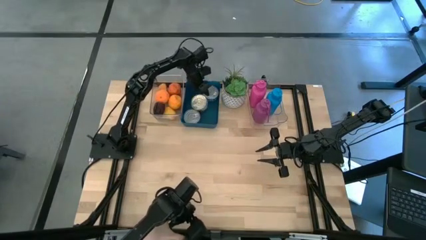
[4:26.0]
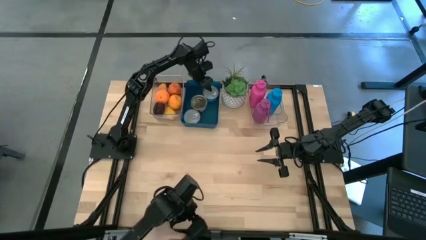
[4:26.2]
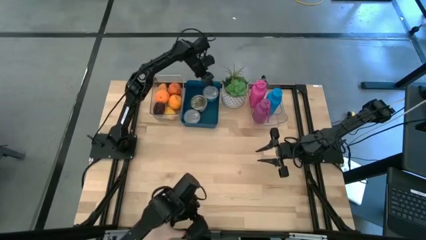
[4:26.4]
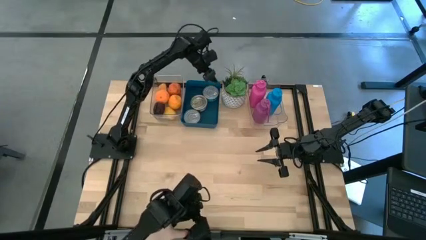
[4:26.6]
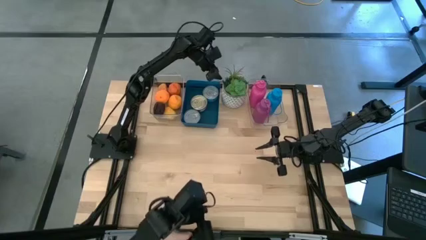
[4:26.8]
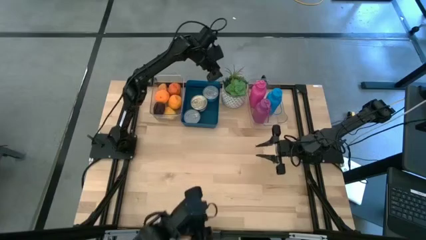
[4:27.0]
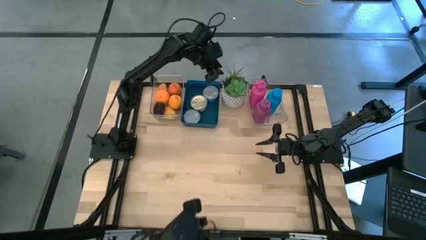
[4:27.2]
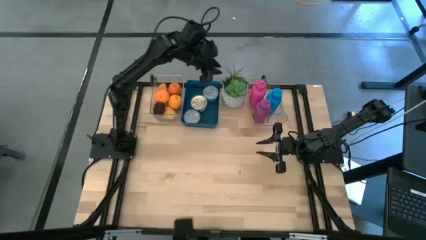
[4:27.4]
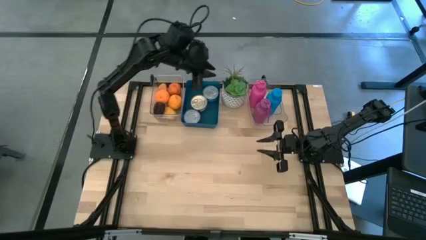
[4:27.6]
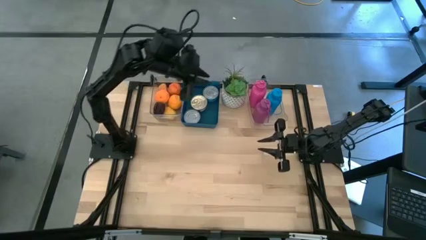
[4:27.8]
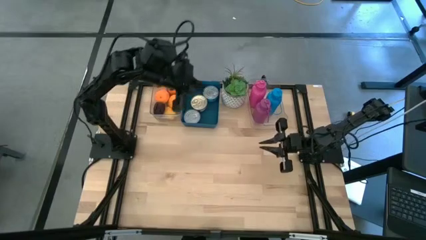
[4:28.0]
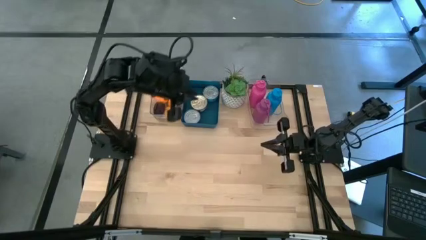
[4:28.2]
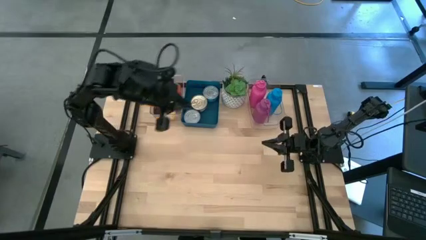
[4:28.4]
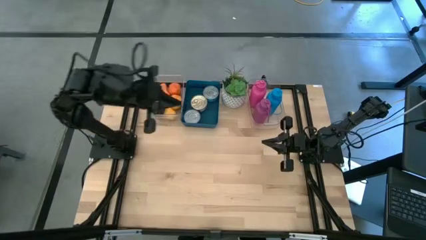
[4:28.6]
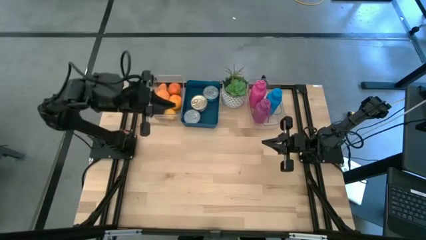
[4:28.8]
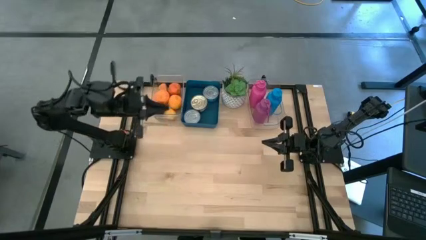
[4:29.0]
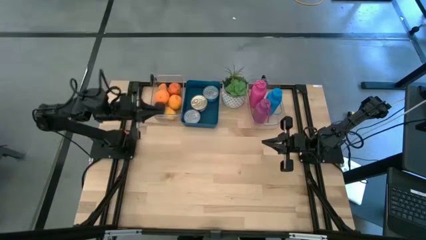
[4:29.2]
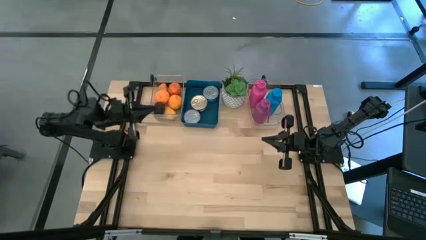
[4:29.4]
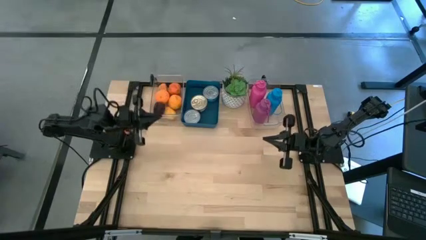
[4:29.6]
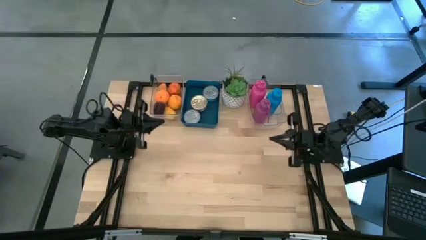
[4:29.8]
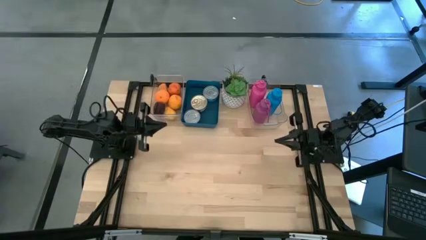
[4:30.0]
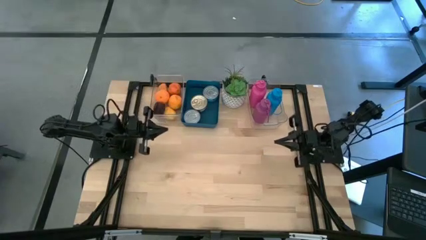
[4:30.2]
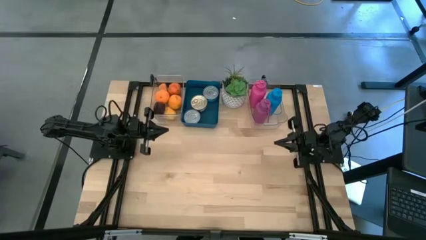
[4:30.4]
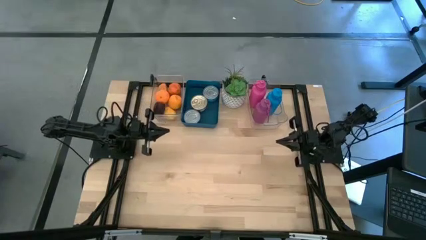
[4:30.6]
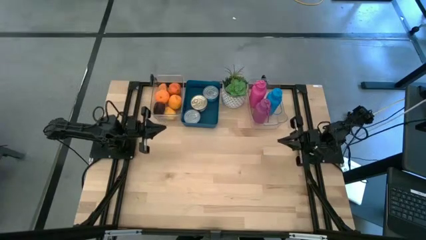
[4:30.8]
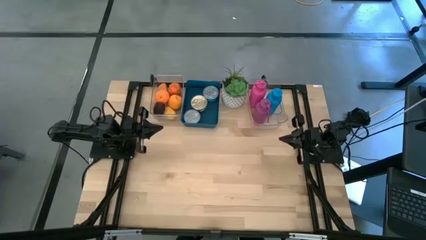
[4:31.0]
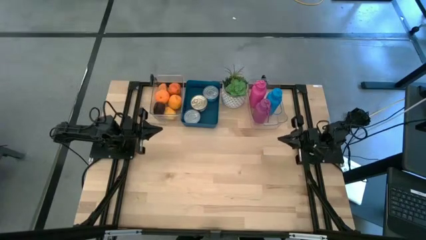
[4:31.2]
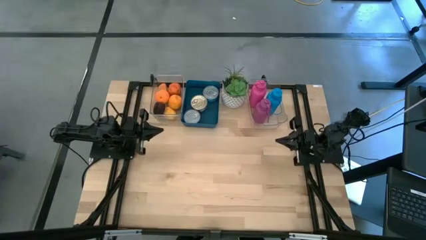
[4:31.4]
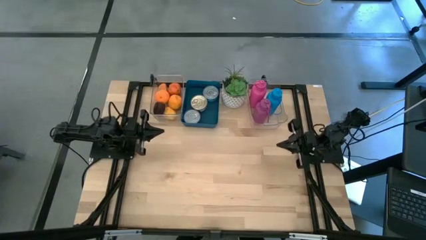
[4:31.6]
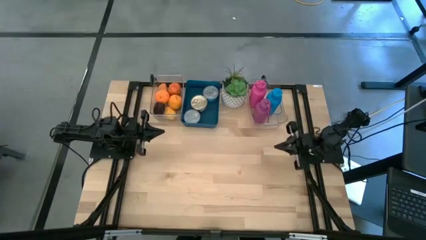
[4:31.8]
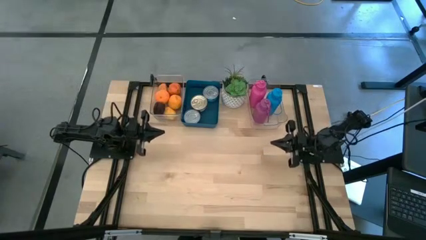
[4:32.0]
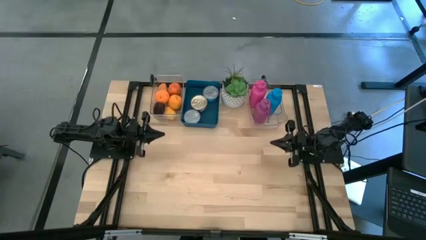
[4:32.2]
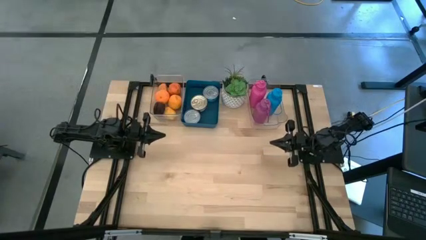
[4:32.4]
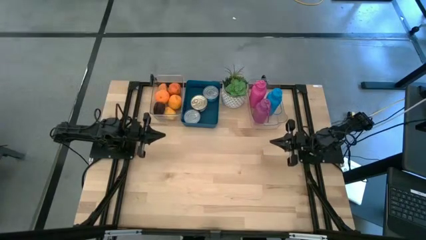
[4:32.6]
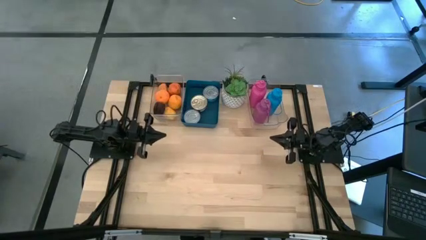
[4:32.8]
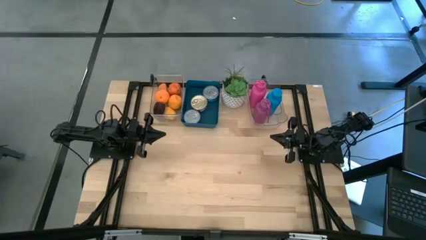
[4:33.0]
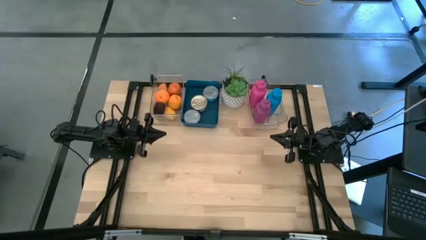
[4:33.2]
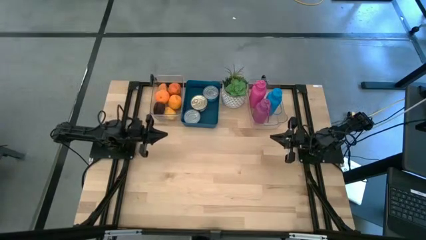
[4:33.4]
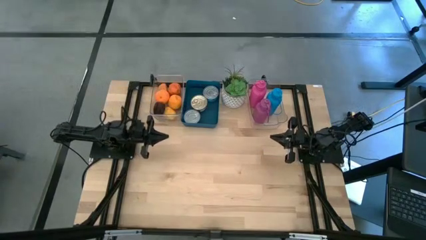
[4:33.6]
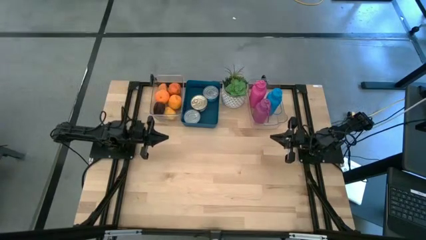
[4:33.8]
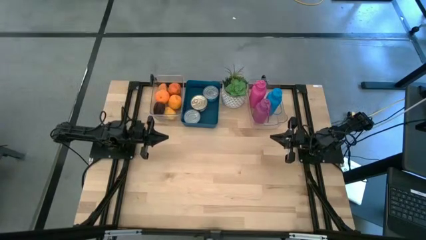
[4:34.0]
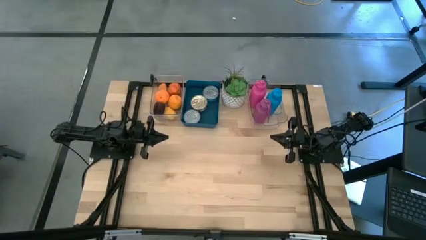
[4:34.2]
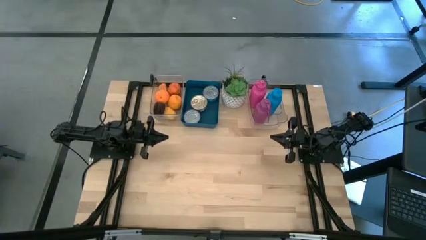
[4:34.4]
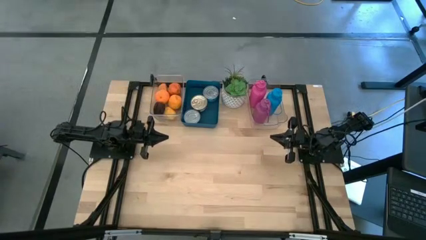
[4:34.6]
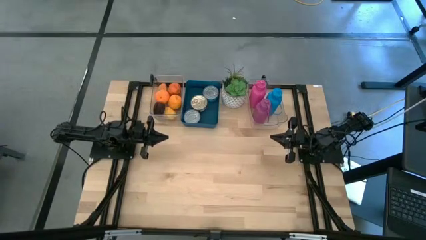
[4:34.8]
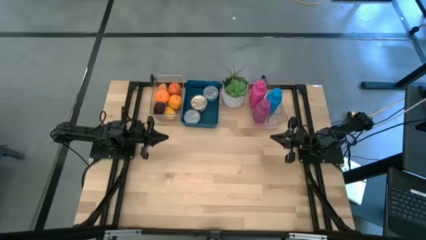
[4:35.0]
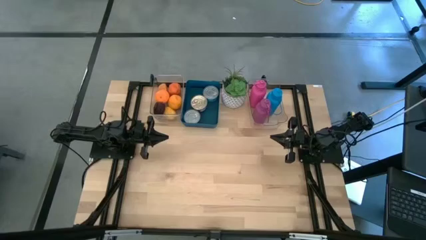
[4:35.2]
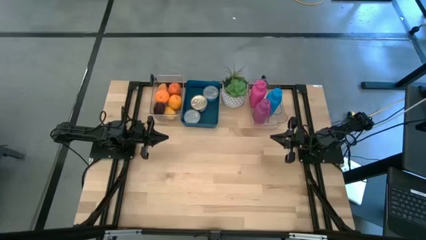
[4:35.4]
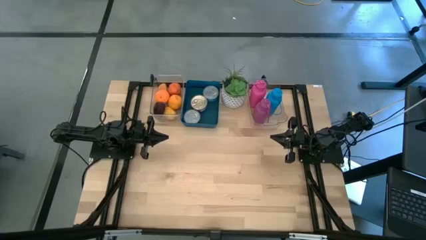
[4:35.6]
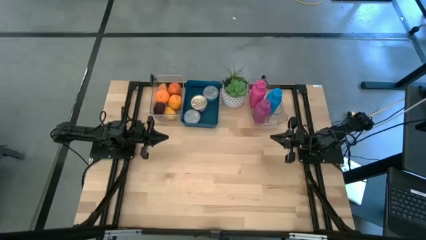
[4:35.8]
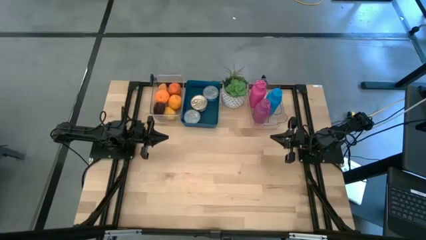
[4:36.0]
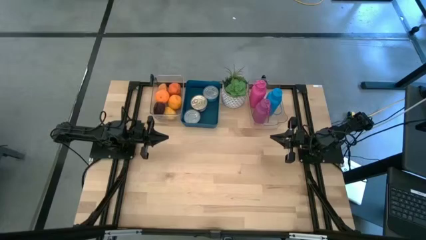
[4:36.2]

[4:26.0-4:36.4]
Task: Pick & Place Food Item
Return to Home Position

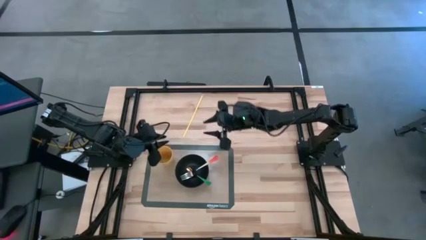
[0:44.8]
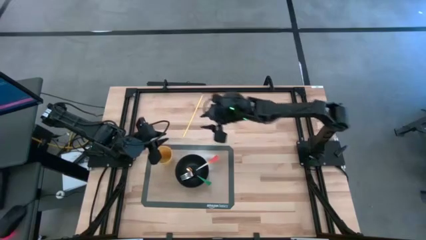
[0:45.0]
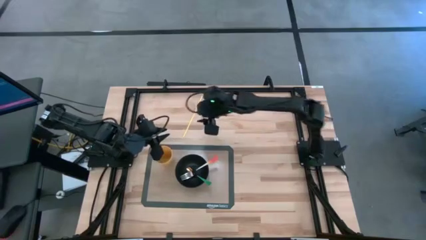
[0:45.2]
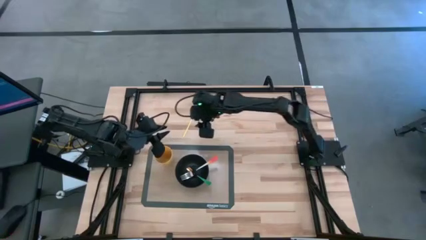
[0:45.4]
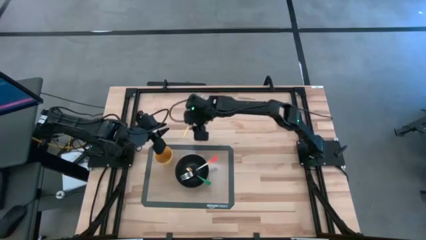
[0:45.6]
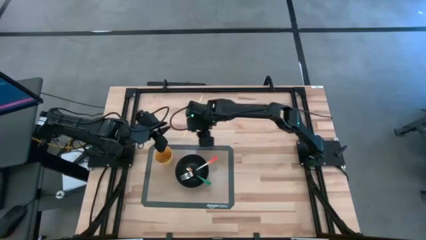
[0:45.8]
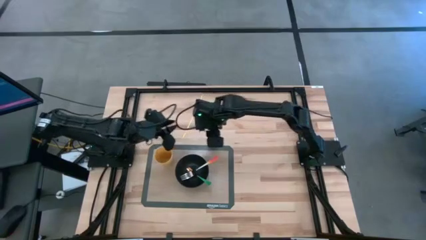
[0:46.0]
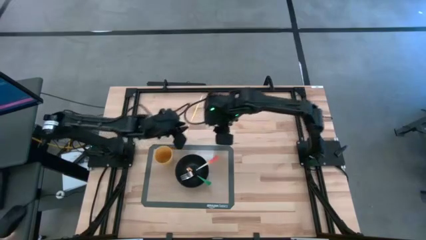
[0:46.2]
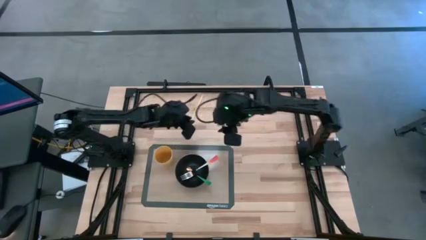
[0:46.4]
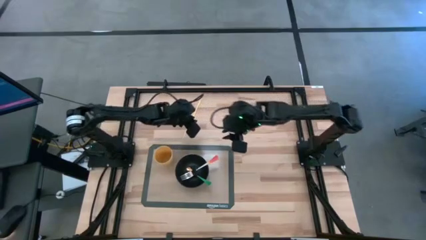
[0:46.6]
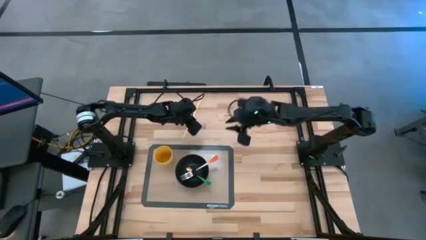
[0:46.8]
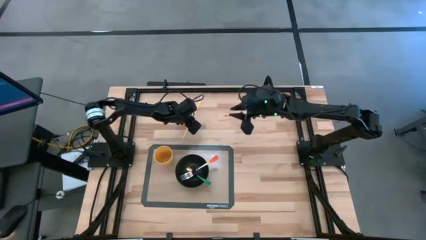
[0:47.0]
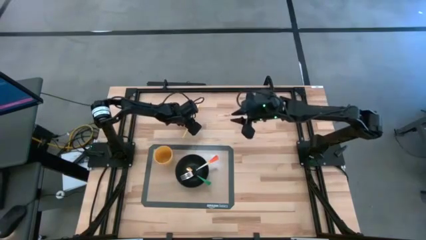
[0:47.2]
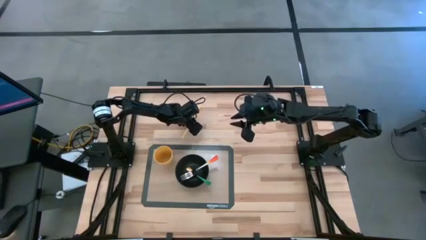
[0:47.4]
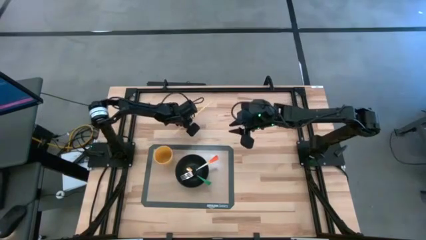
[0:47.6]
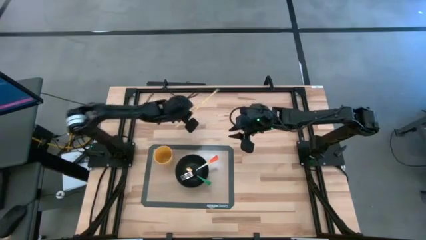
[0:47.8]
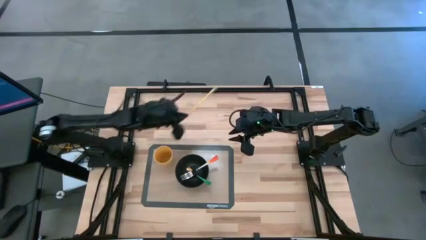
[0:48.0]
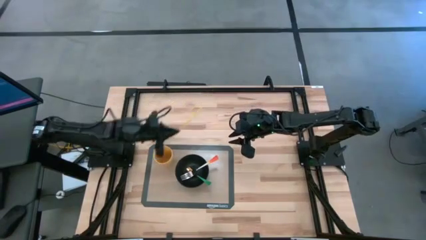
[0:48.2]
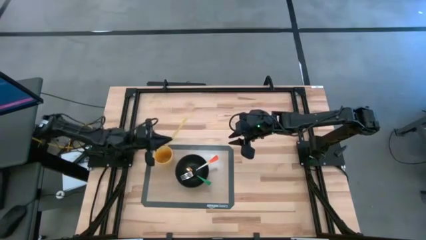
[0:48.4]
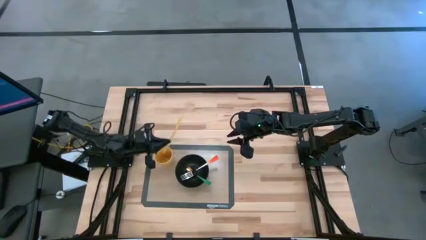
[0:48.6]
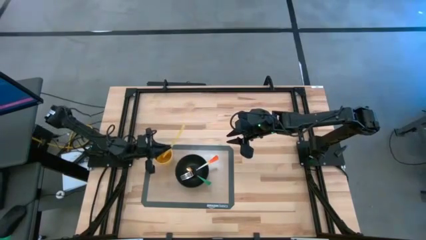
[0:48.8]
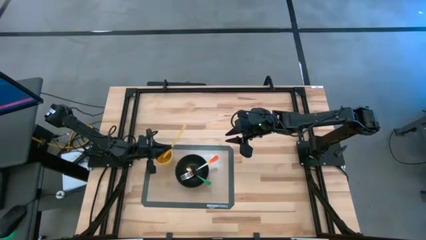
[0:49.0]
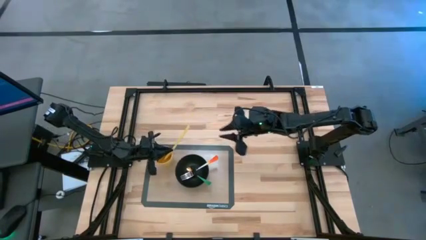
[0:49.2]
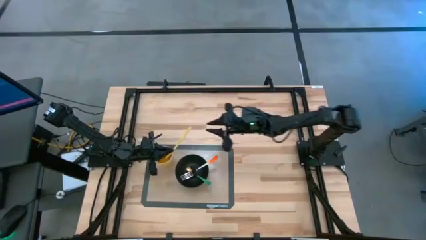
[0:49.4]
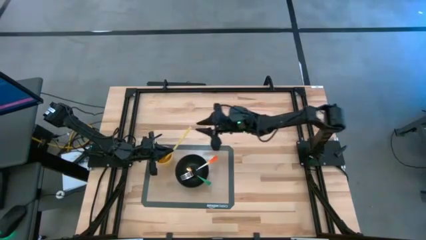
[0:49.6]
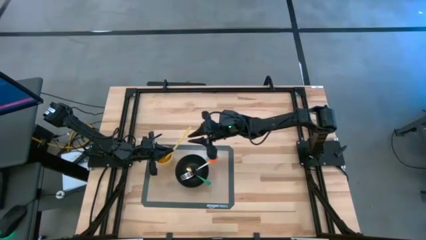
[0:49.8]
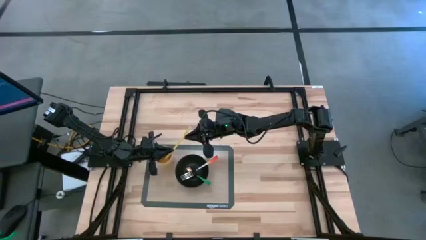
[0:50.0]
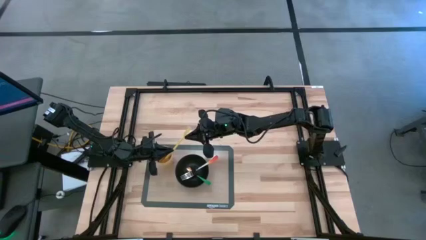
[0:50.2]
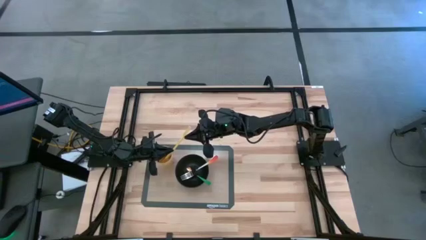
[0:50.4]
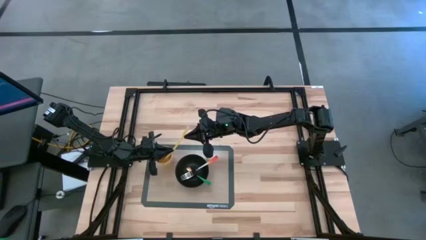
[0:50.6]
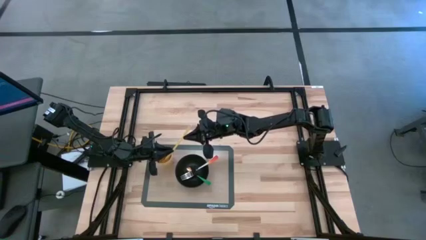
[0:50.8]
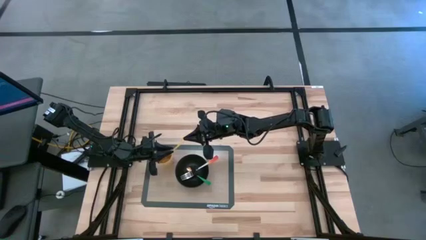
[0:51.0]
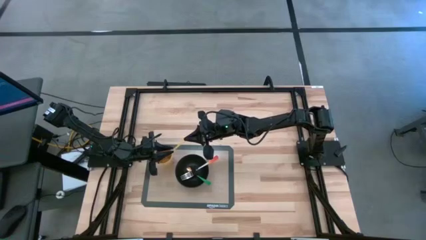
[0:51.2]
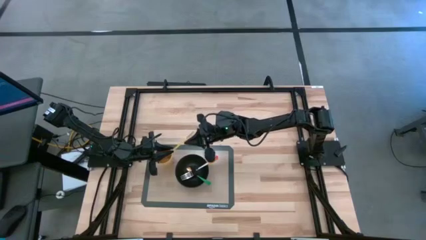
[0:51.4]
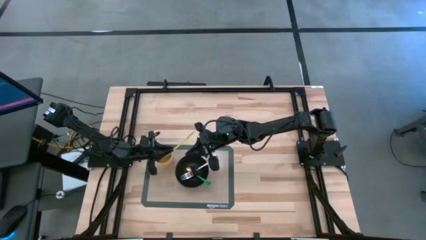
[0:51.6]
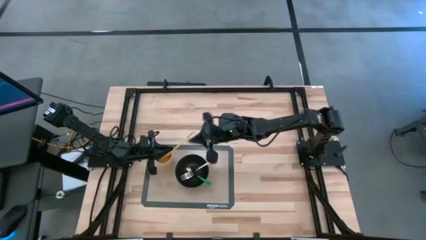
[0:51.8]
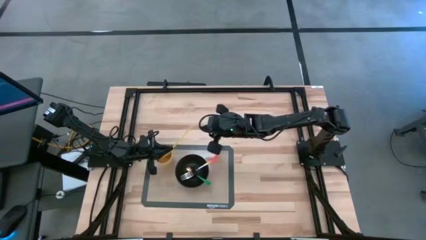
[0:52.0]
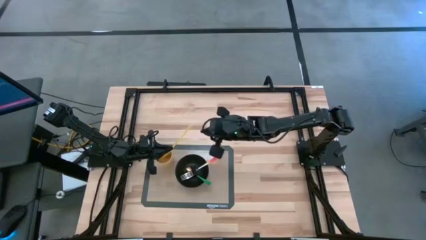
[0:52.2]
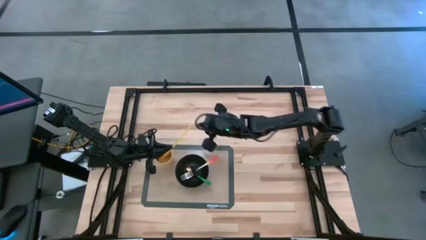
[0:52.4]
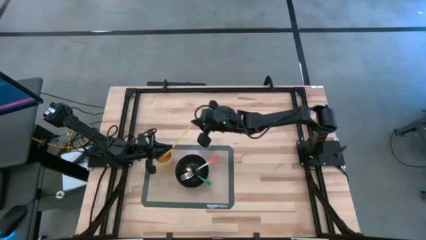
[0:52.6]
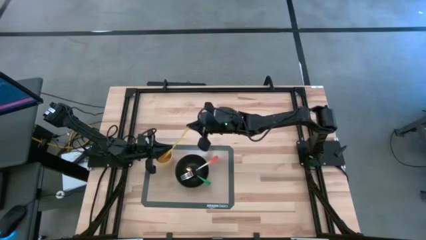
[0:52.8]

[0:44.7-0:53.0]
Task: Pick & Place Utensil
Put the yellow straw into the yellow cup
